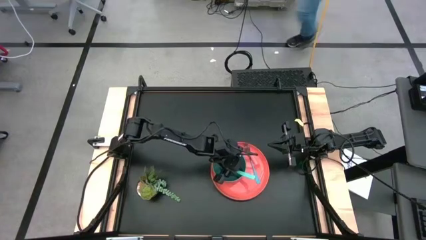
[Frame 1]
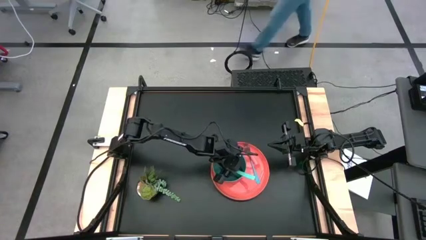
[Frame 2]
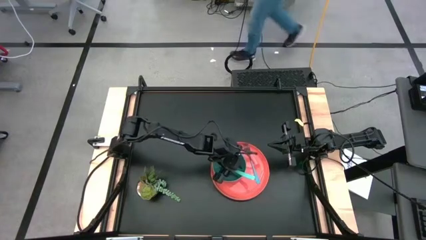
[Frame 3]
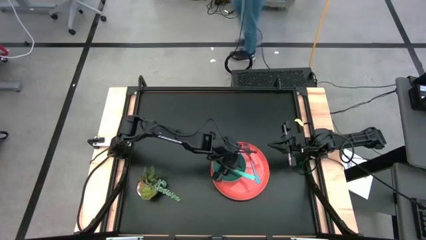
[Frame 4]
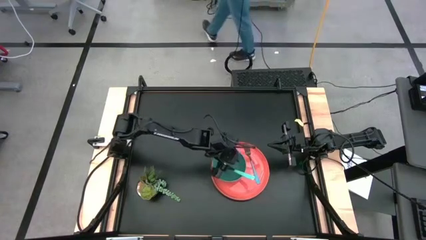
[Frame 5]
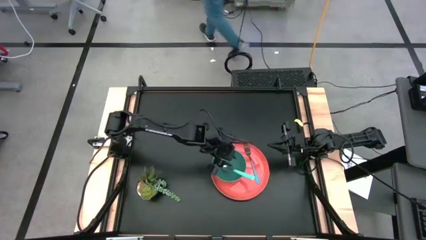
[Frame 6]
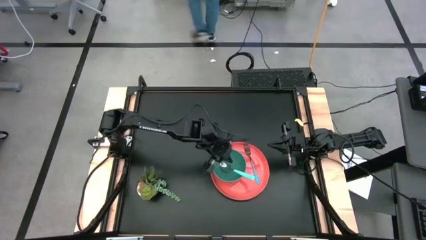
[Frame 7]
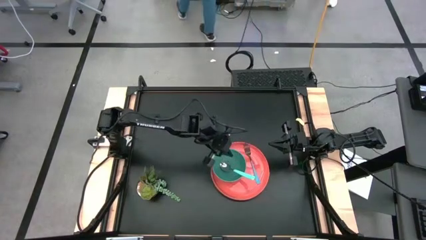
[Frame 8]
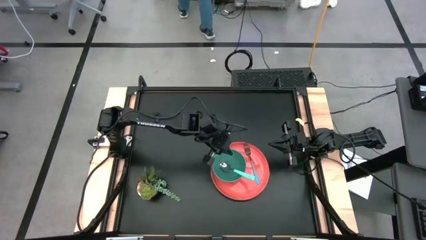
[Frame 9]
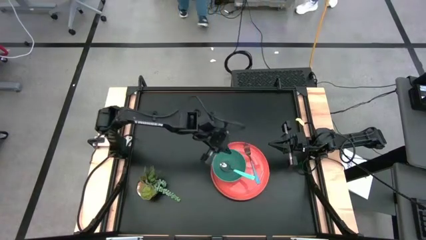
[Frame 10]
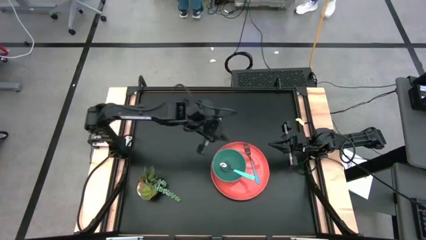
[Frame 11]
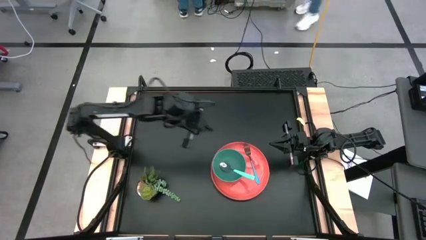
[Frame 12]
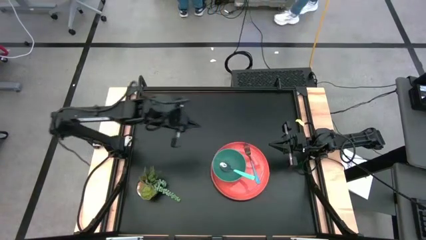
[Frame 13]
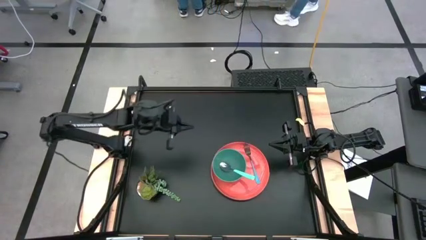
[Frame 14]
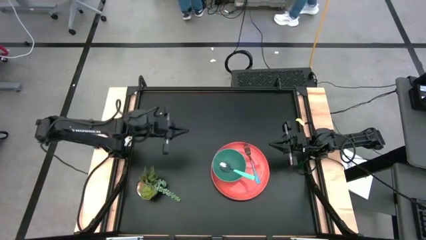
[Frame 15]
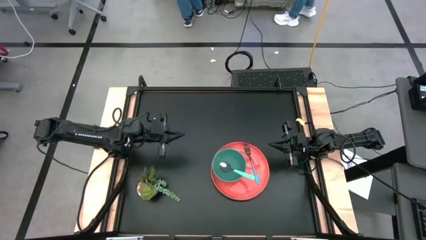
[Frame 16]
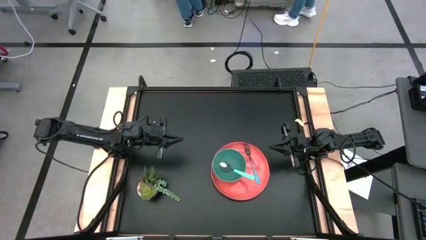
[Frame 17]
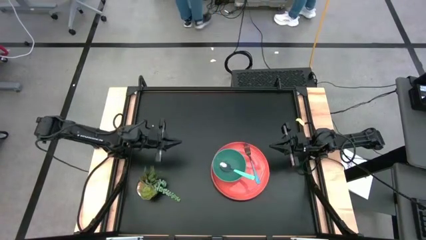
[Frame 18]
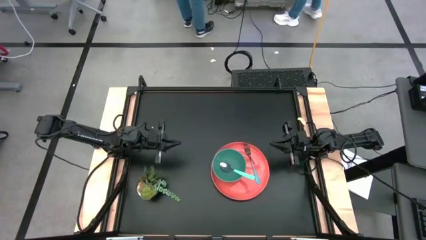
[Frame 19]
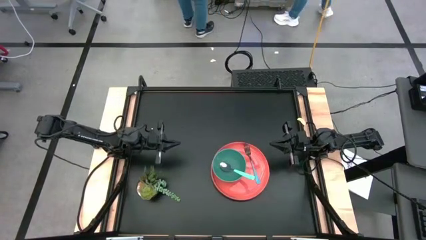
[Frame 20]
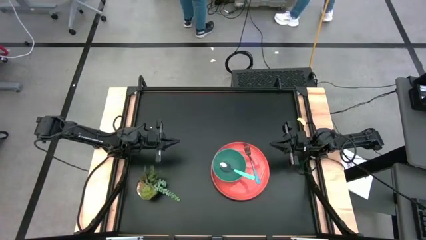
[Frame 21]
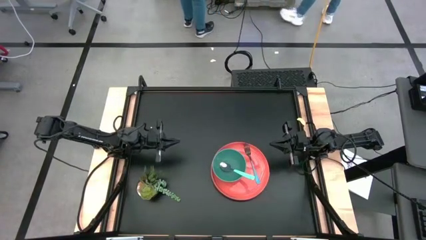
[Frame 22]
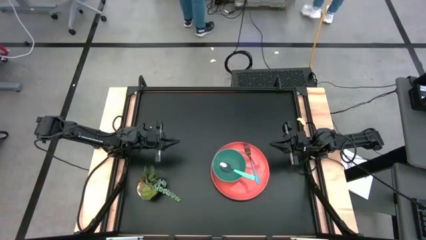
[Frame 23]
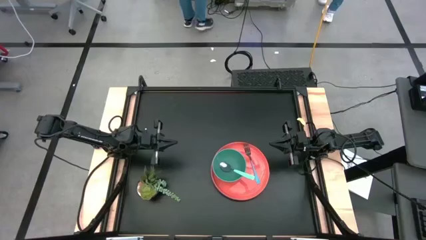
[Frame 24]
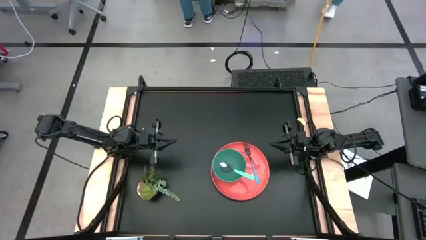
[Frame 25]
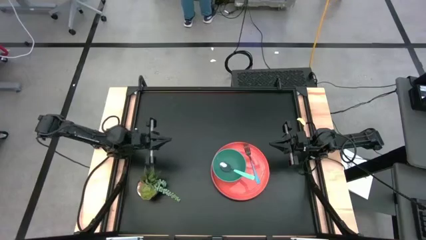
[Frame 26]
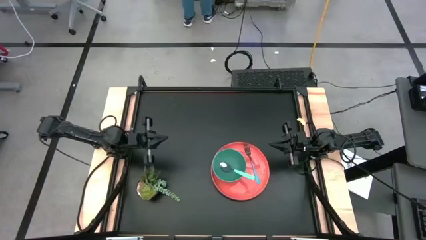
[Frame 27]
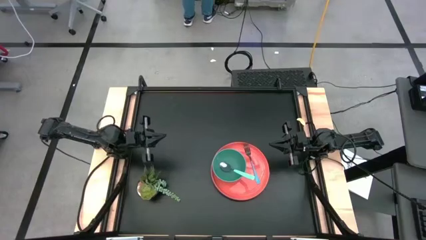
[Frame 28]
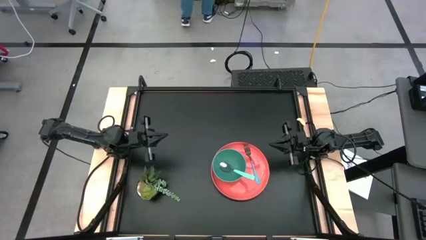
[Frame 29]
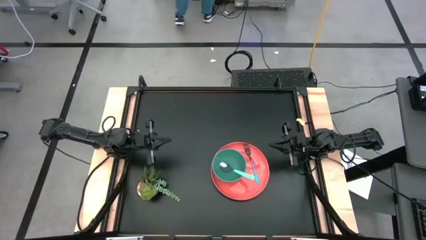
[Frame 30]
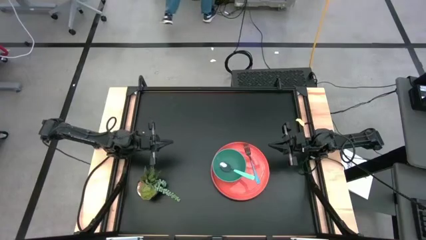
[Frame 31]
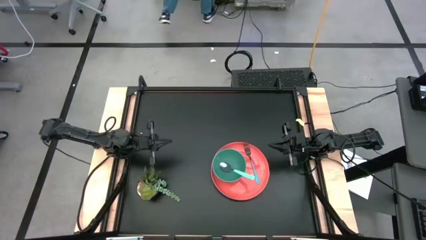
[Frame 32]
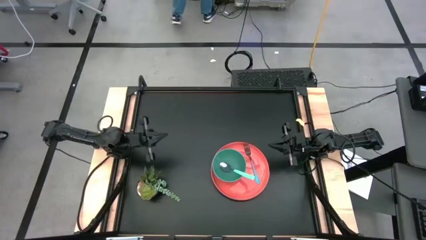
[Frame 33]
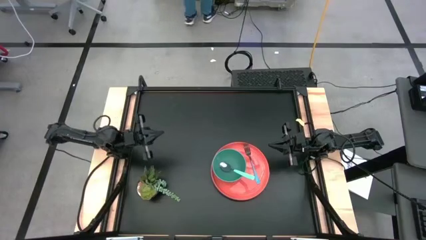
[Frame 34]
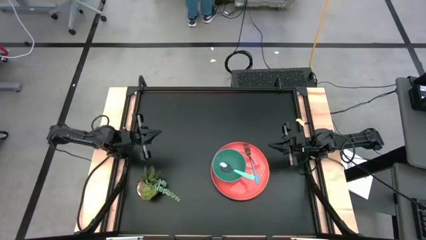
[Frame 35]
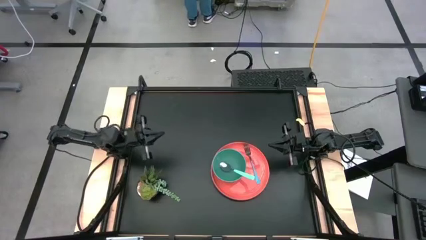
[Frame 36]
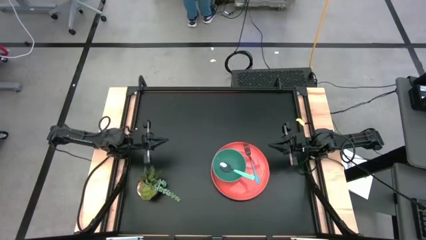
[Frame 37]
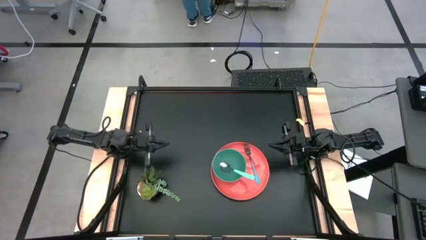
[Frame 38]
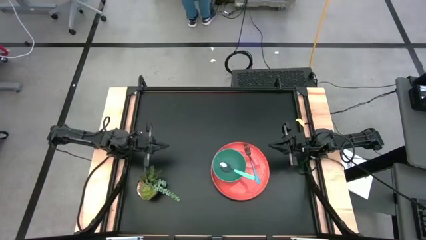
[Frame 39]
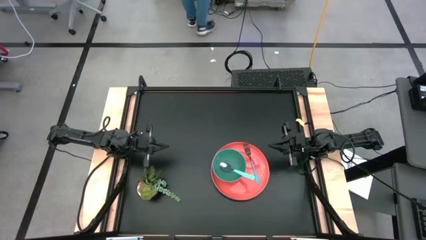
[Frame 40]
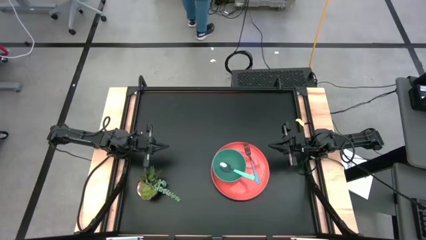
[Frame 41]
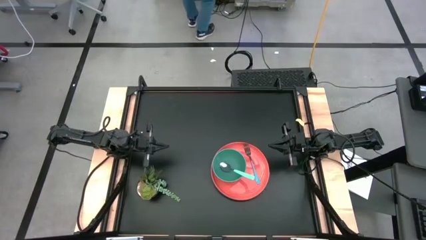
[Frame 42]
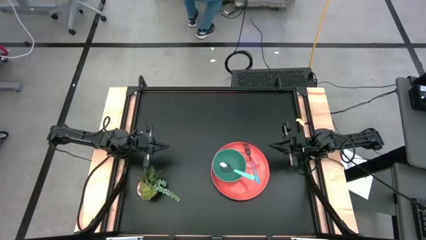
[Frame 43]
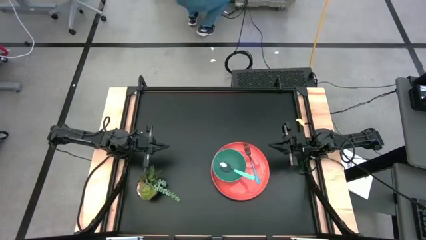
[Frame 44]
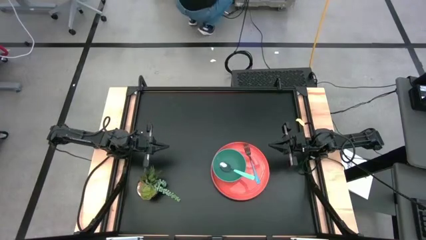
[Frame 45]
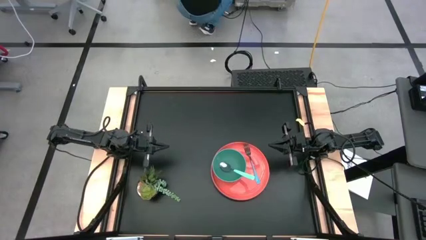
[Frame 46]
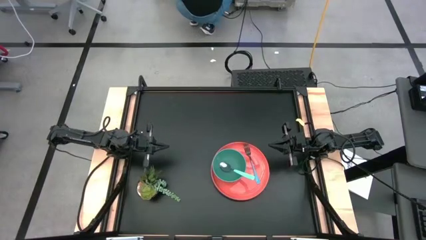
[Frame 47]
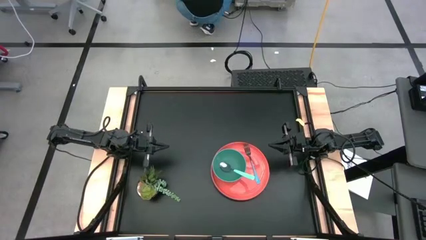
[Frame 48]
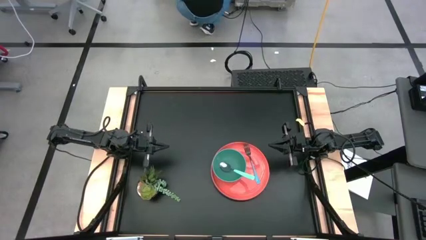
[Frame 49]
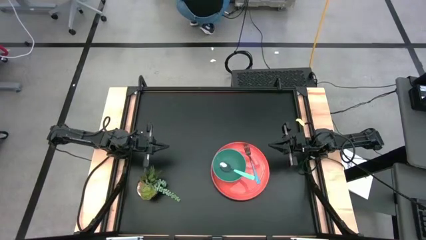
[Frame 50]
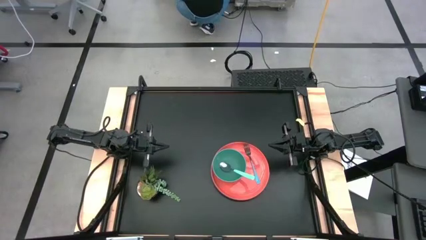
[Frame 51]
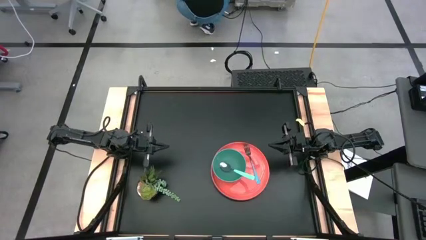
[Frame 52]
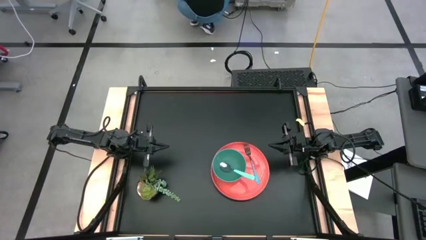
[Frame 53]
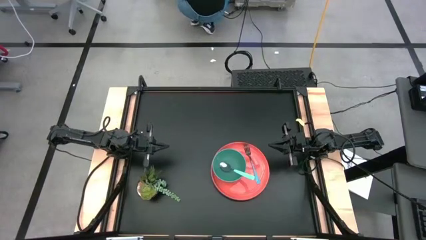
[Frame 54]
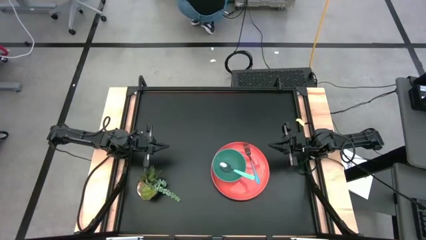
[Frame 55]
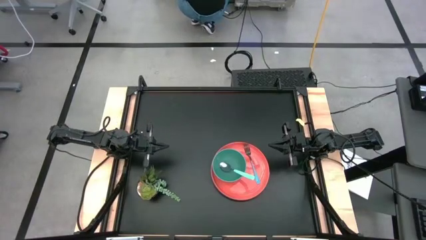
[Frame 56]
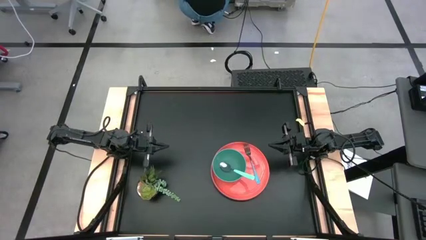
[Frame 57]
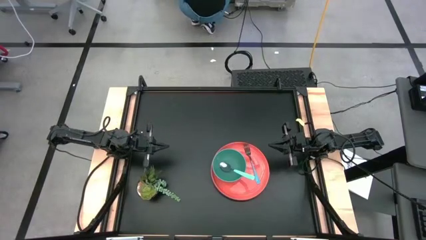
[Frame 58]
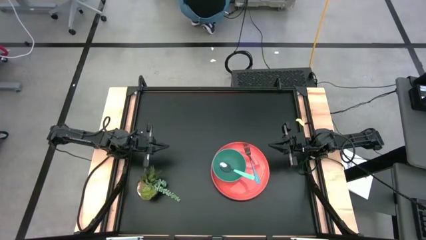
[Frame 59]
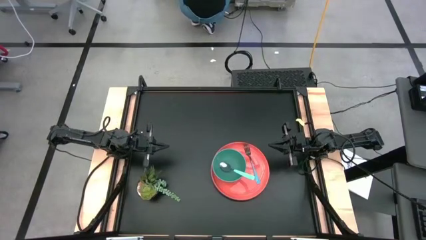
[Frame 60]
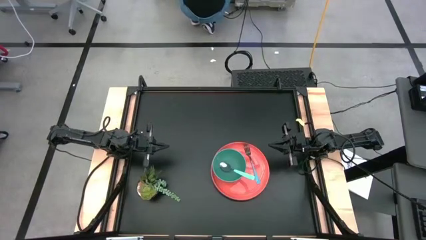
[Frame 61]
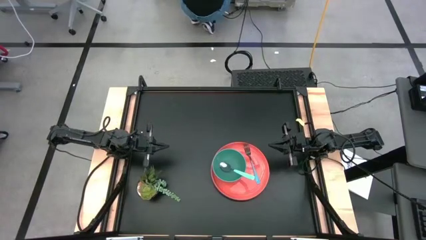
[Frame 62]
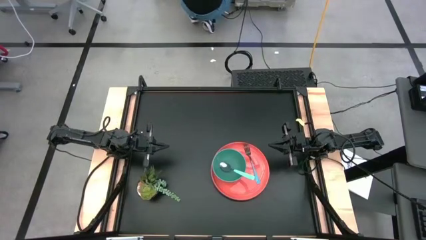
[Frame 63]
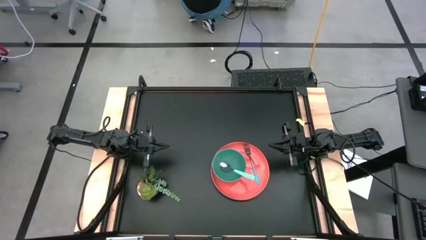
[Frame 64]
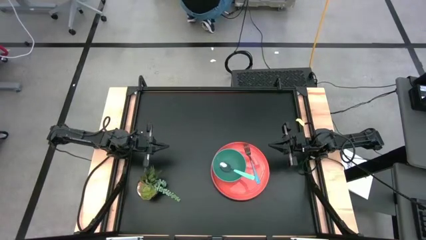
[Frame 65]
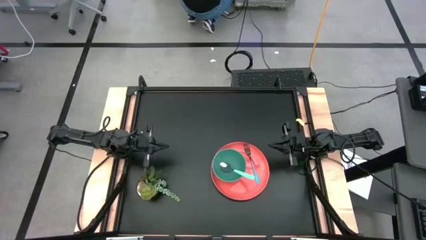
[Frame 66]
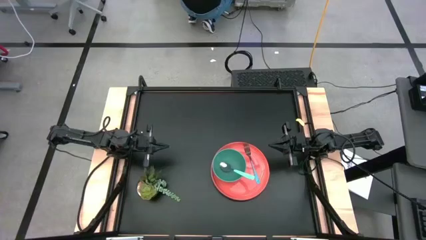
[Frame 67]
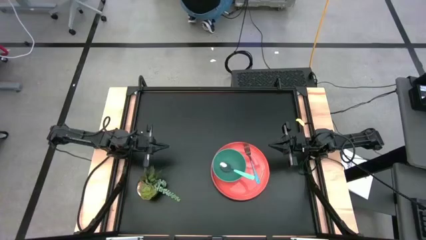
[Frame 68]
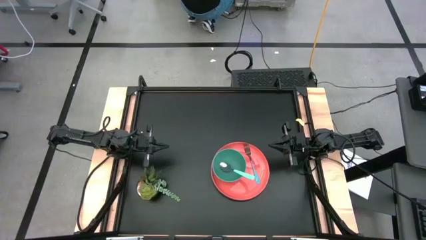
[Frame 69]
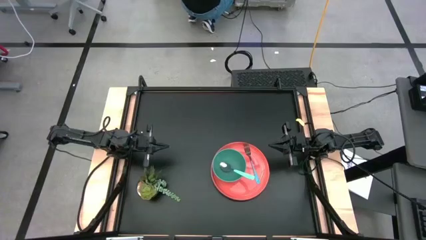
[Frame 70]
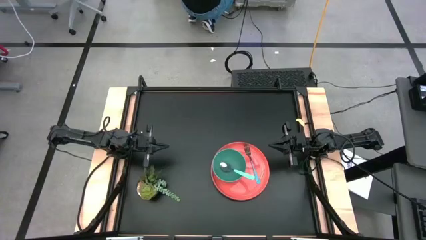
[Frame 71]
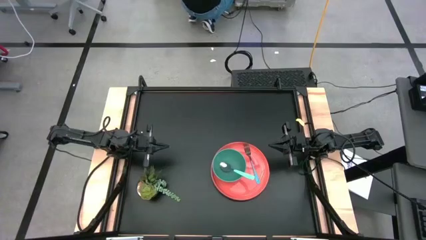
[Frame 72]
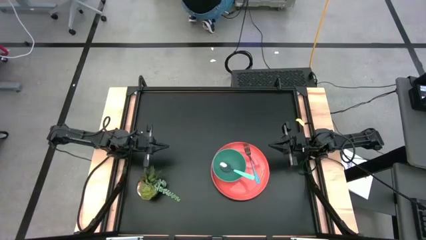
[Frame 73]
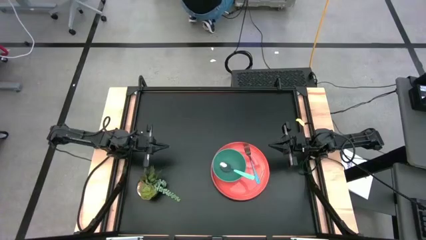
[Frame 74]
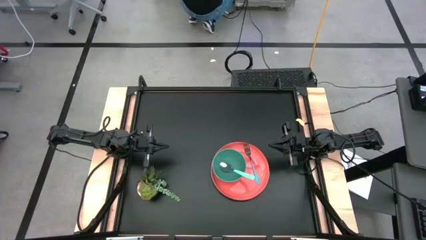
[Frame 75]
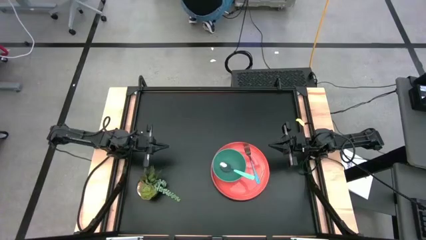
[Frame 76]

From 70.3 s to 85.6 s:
Task: Pick and place plate/cup/fork/spoon on tray
Return to Home Position
